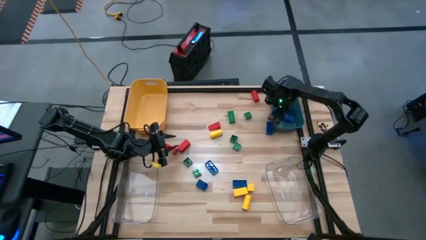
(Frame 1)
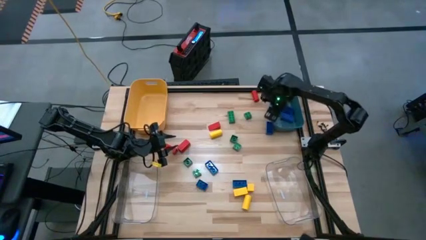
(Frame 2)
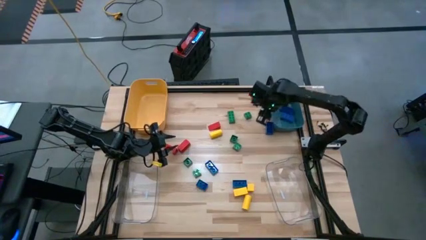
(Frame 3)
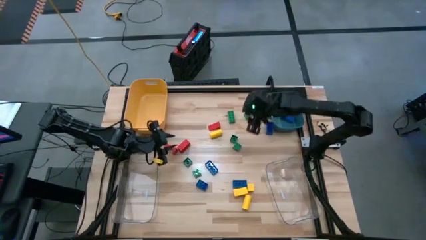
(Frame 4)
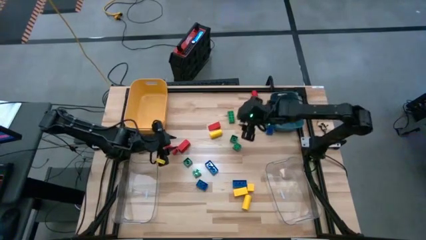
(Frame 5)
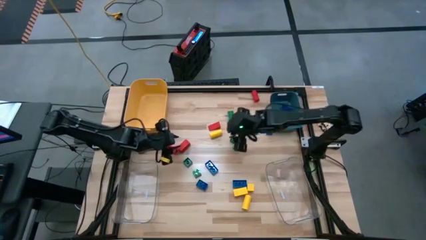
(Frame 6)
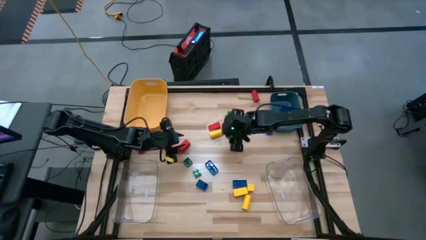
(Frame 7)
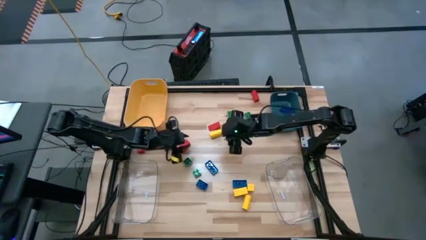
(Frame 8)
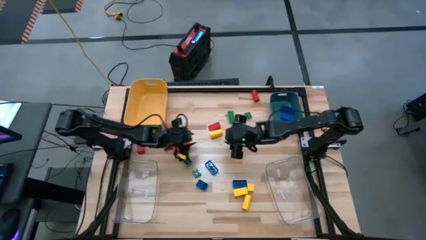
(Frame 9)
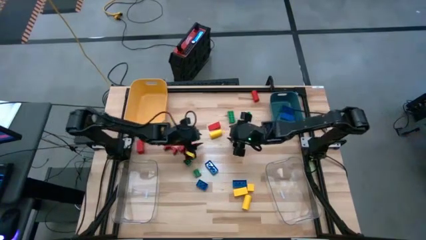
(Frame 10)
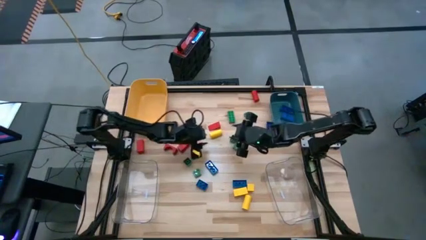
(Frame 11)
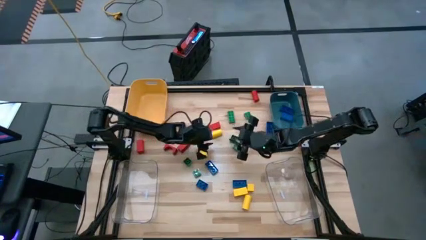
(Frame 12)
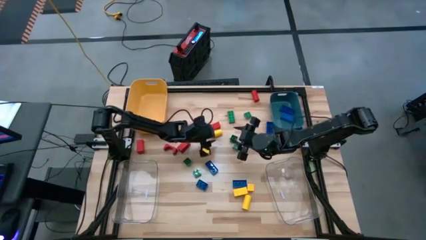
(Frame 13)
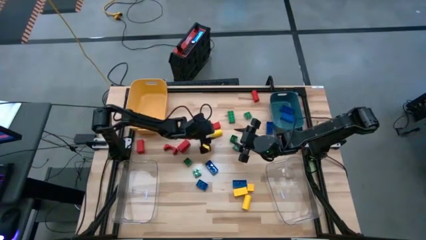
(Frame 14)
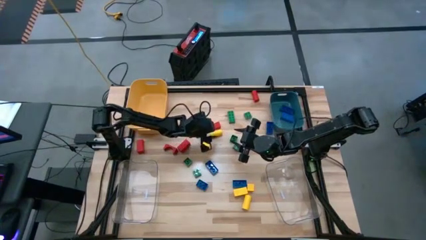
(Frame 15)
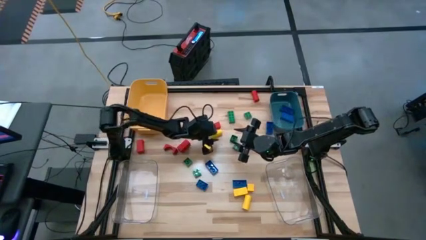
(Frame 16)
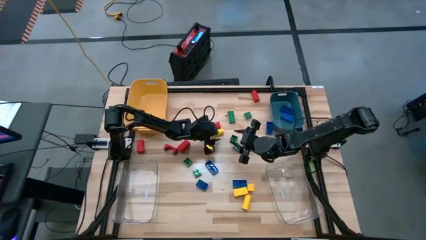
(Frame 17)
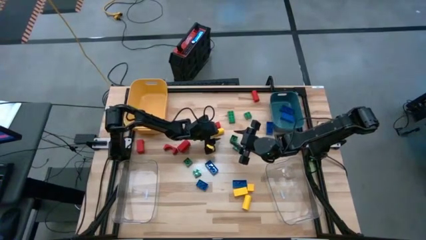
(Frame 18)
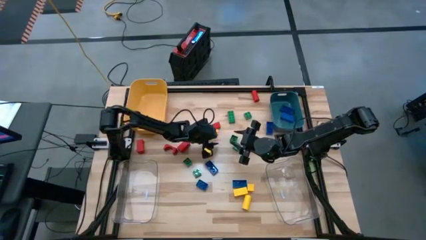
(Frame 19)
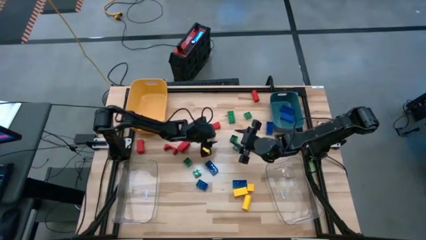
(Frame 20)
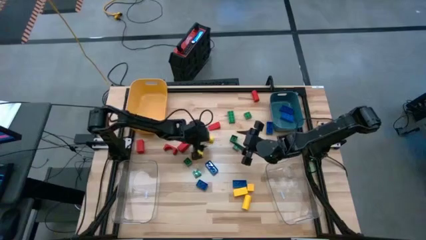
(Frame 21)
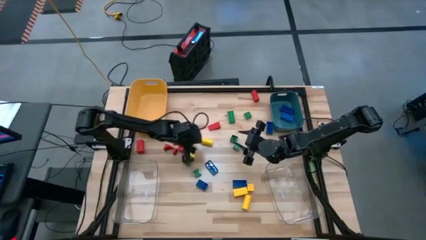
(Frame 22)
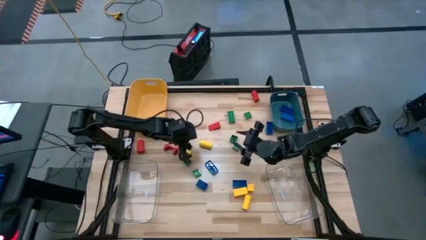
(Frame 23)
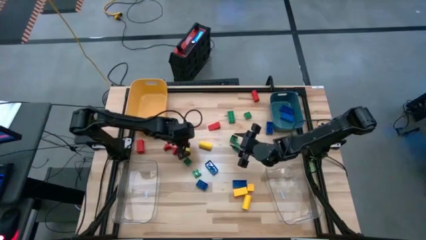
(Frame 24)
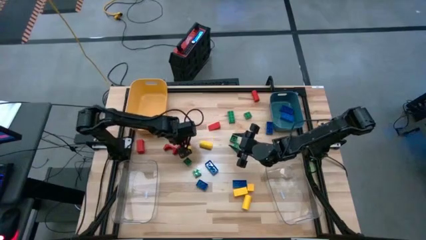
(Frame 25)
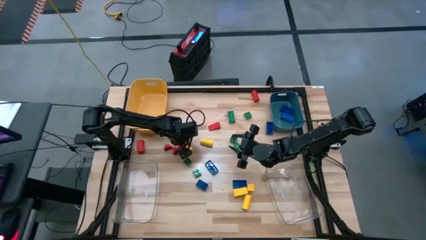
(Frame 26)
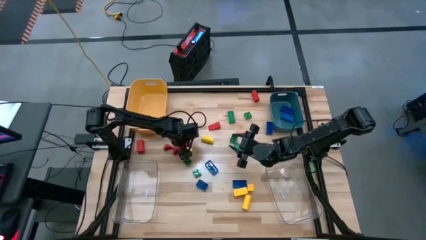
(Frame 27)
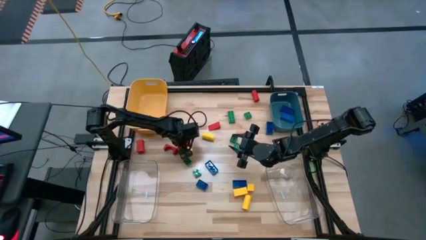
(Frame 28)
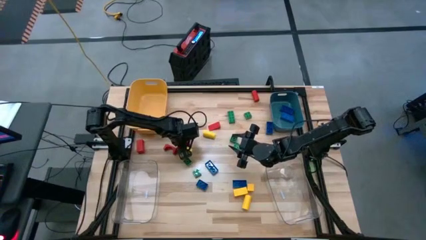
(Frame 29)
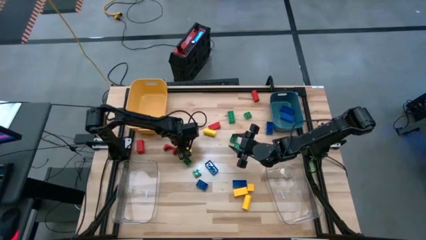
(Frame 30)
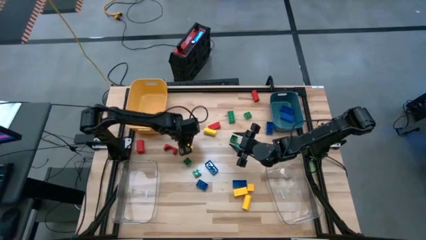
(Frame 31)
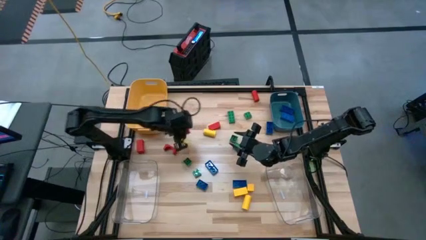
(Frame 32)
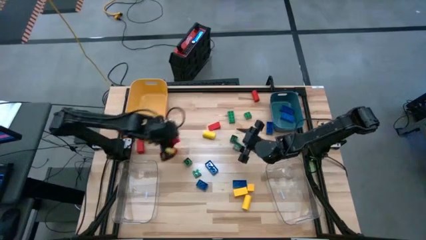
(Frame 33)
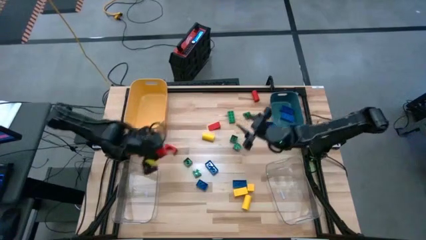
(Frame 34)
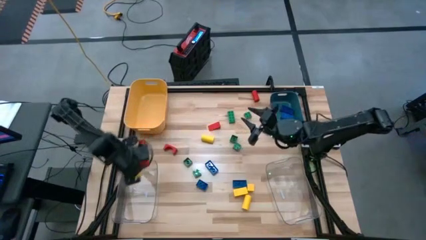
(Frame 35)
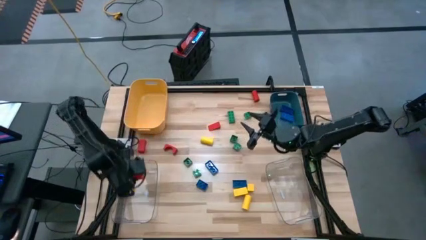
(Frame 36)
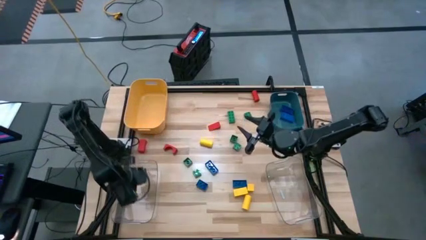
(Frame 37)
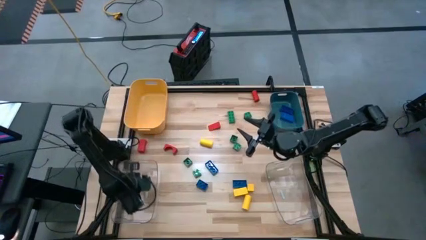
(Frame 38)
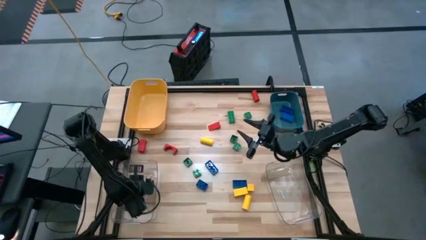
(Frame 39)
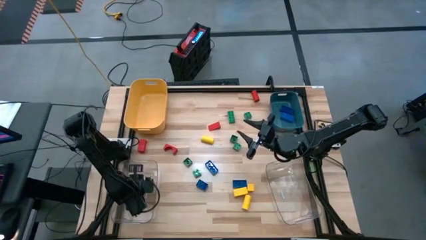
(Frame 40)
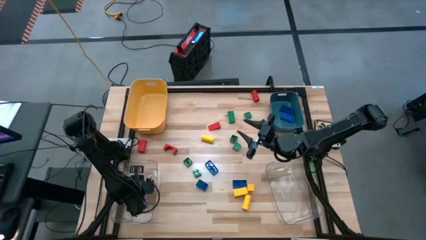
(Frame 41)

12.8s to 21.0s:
Task: Sort blocks
Put the red wooden block into the left transparent bin

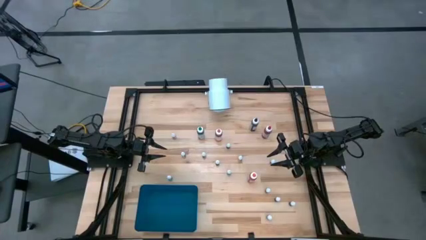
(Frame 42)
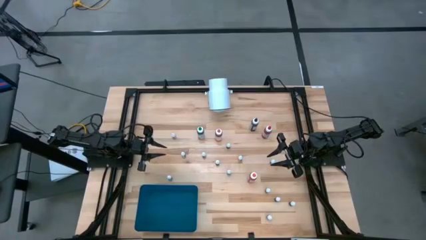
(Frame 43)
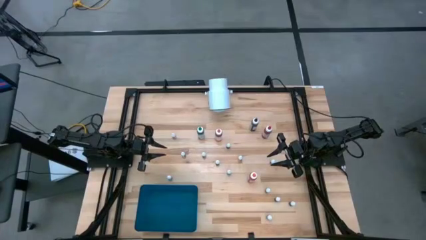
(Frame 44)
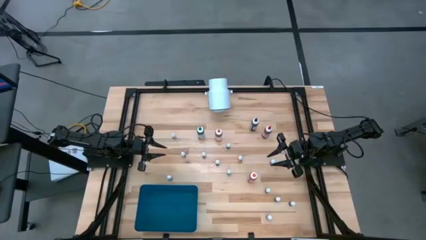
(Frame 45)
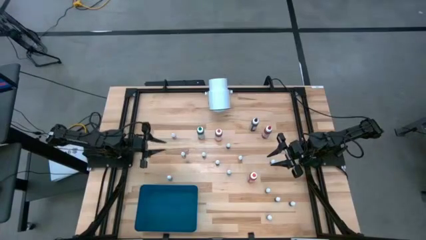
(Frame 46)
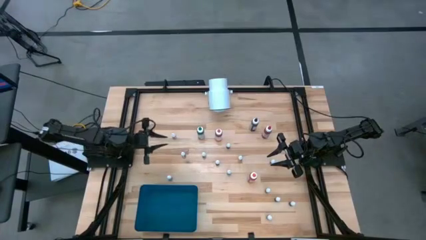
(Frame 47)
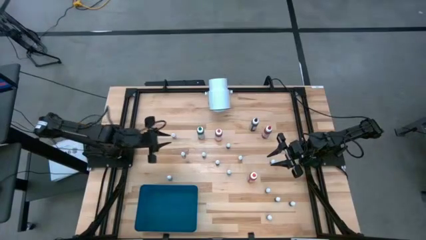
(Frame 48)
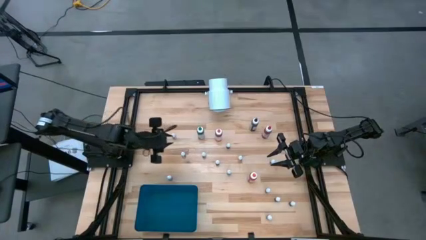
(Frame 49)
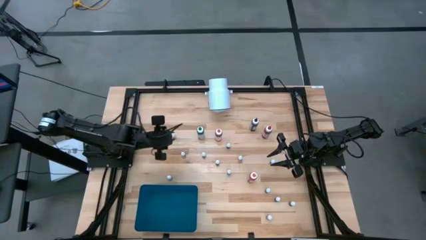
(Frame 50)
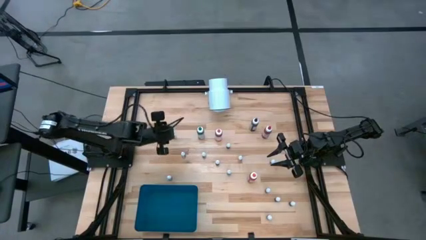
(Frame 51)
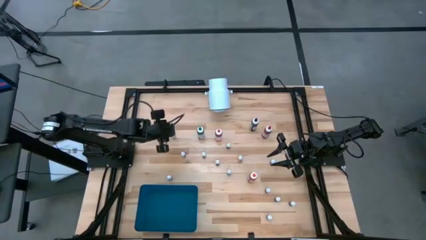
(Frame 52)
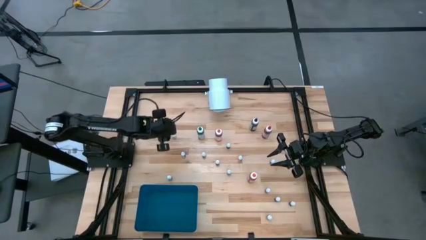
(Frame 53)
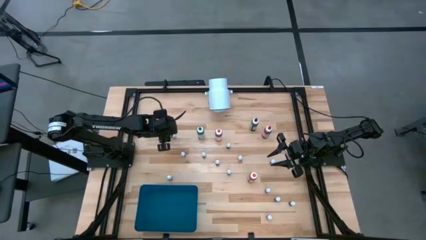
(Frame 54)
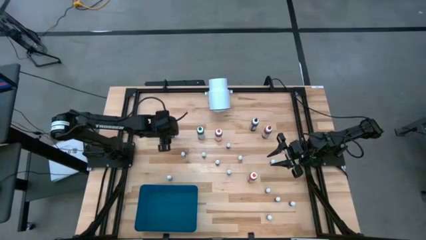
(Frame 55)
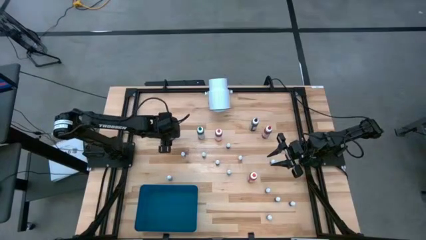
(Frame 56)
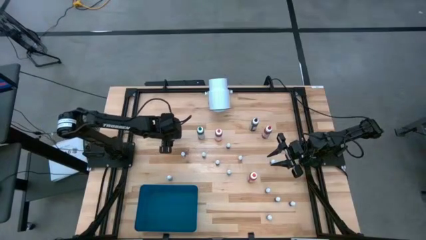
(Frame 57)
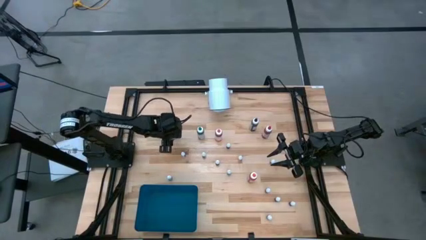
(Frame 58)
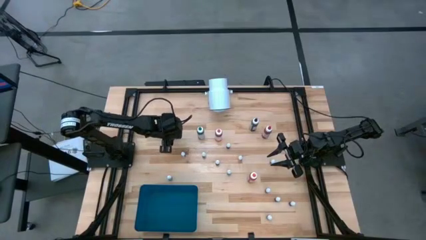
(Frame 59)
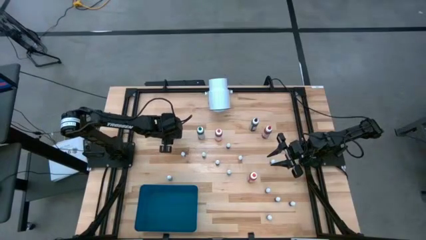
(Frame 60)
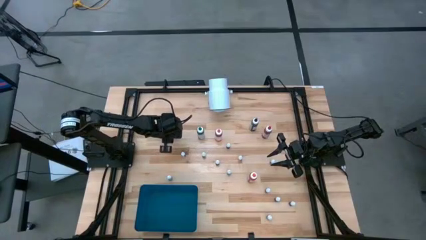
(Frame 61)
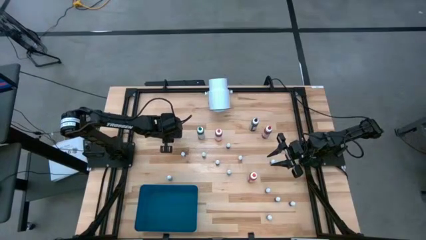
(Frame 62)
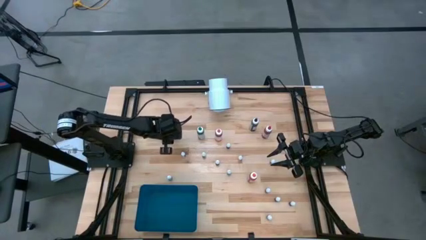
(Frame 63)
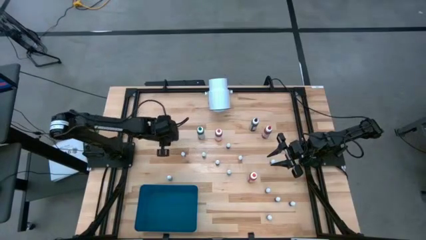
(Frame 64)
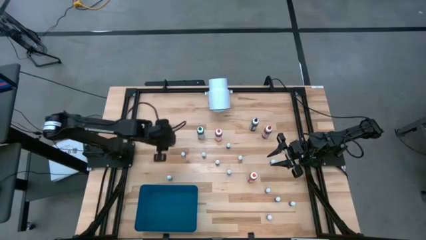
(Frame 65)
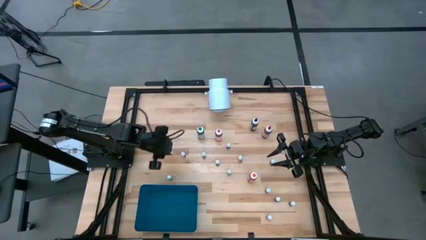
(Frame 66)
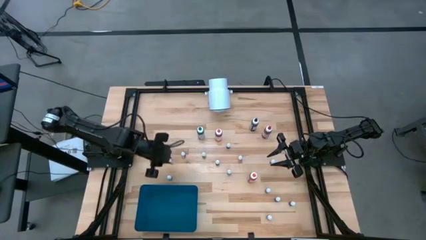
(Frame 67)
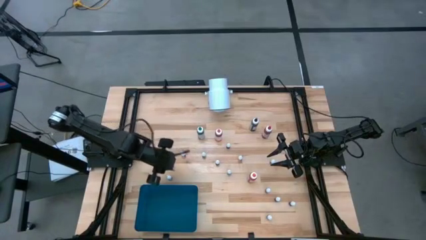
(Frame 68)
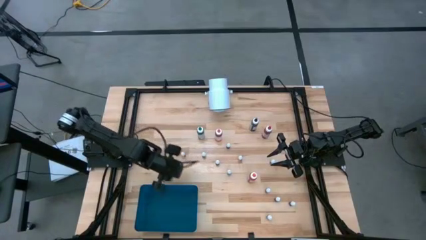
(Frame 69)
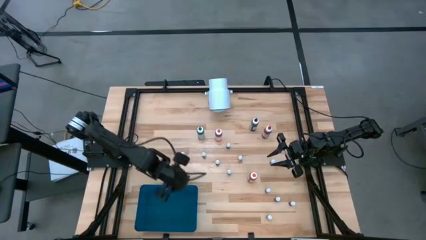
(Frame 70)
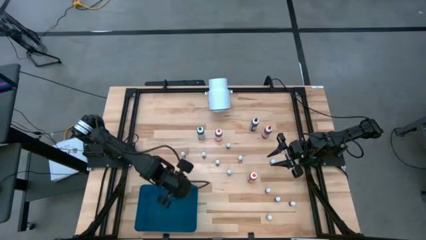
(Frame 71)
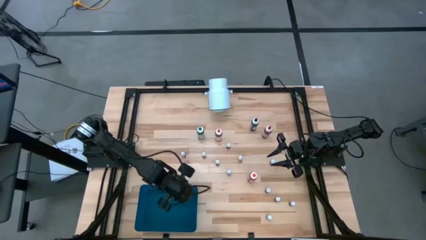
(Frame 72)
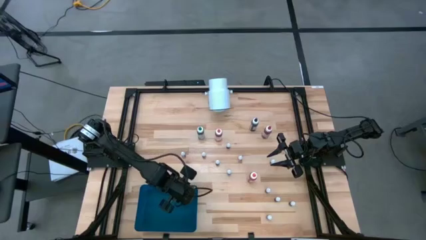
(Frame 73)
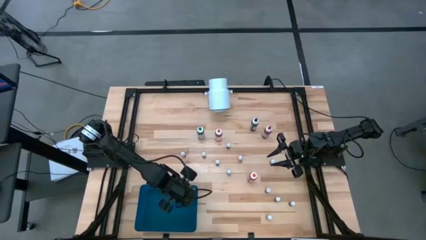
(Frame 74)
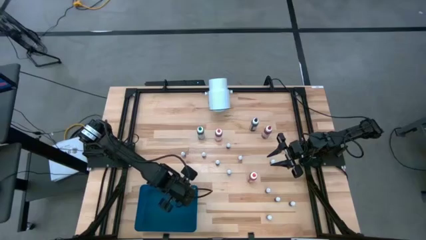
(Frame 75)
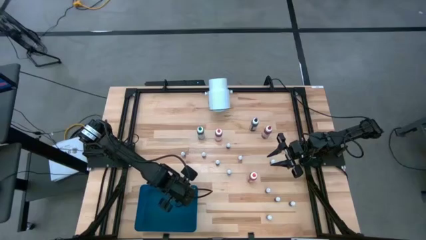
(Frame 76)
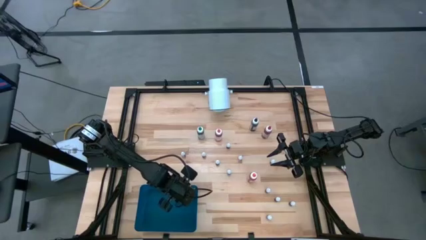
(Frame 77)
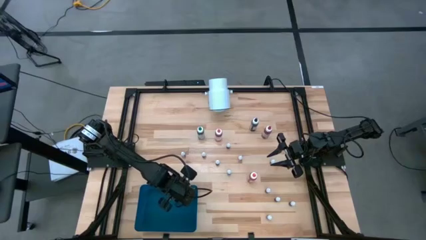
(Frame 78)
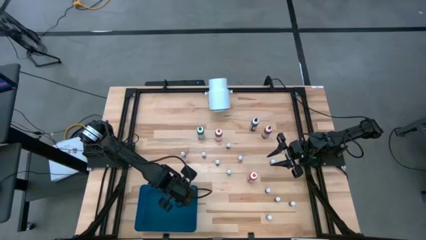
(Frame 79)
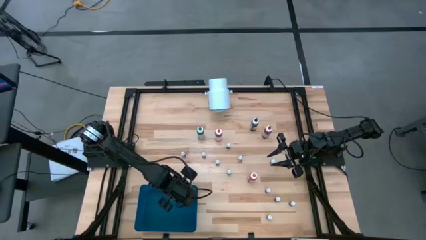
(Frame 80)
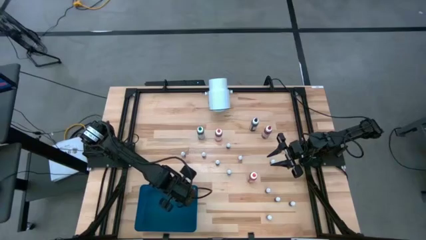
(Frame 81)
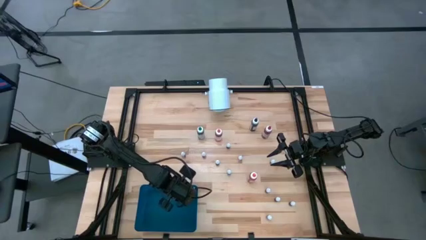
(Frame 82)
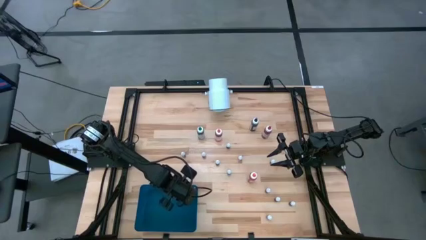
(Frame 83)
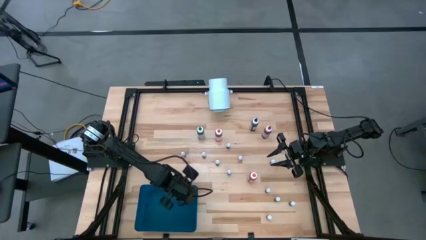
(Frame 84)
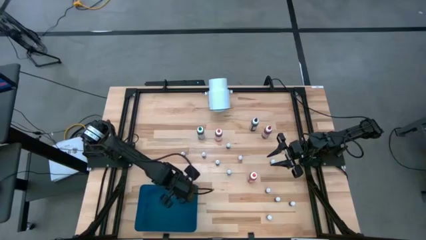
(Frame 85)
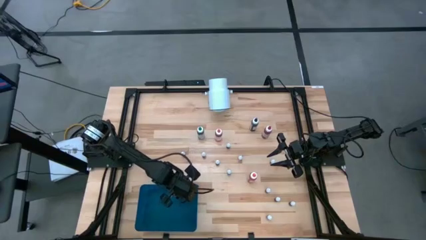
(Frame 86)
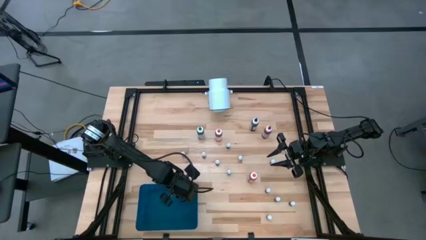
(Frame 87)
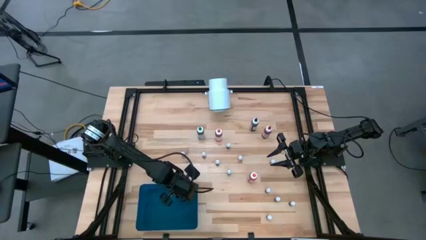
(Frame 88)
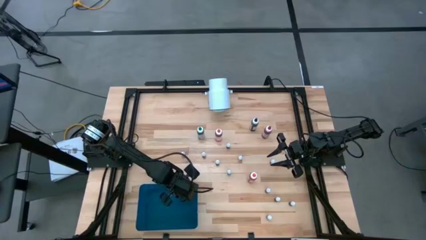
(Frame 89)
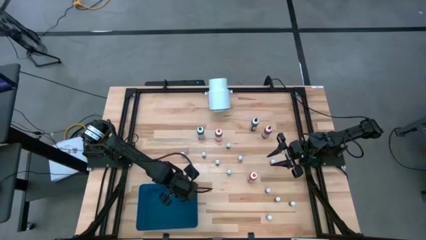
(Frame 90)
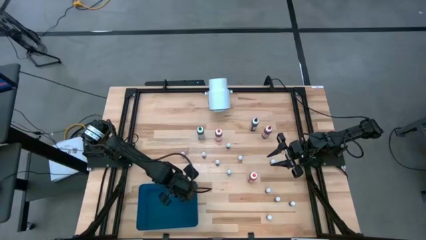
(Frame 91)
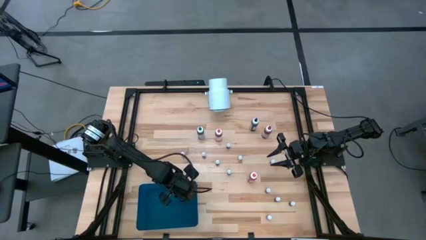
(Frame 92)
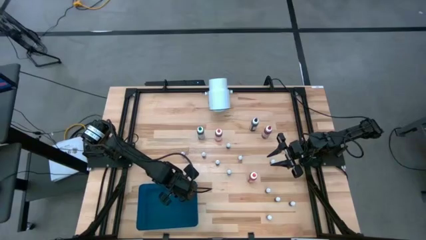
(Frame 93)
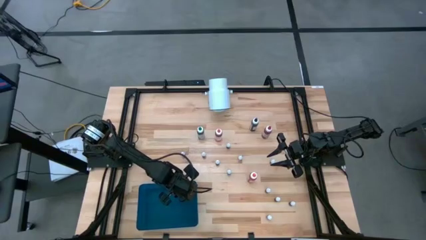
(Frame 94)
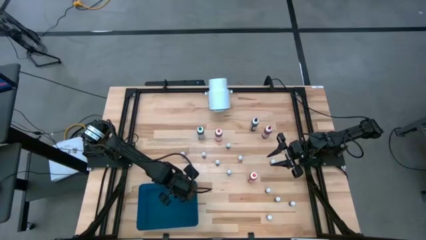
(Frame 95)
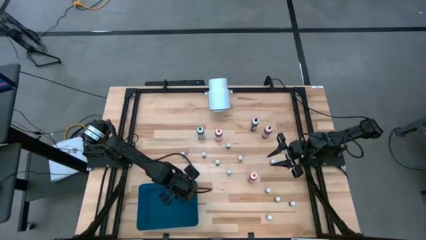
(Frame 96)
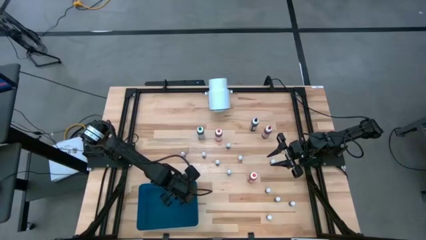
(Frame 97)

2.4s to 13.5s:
Task: Pick & Place food coloring
Put the small black food coloring bottle into the blue bin
